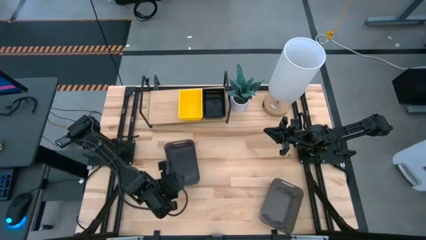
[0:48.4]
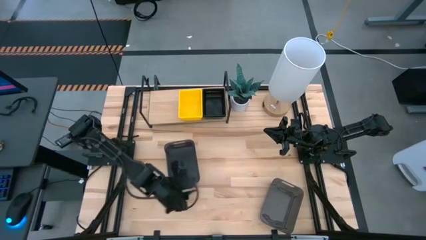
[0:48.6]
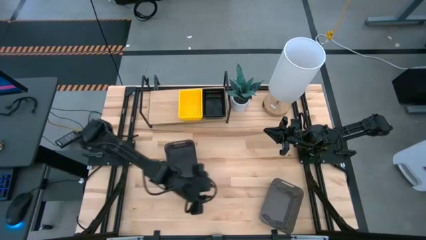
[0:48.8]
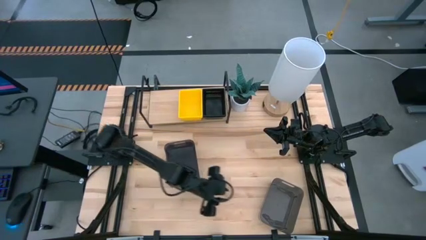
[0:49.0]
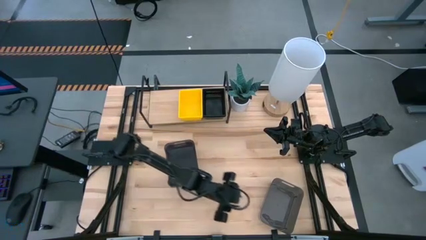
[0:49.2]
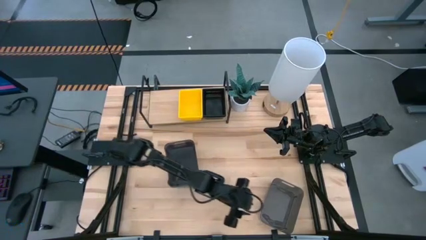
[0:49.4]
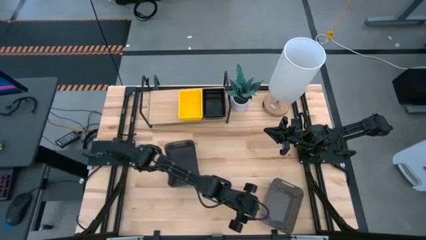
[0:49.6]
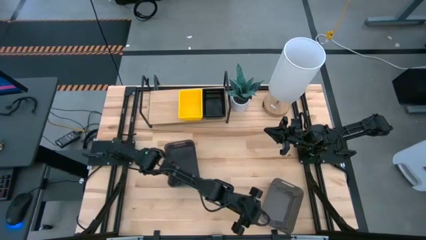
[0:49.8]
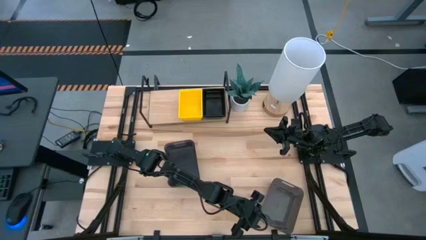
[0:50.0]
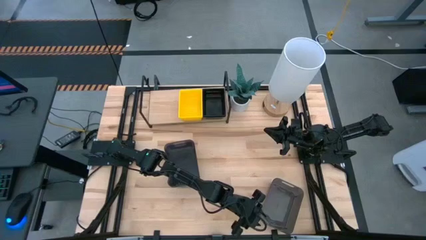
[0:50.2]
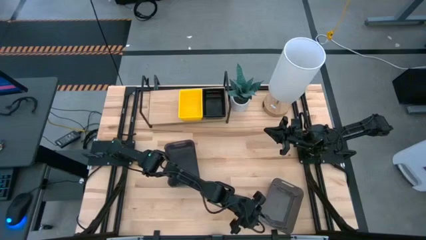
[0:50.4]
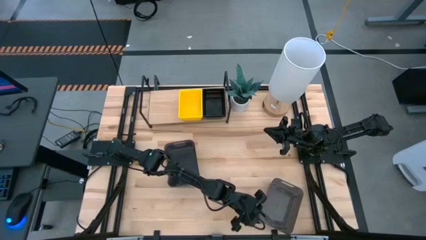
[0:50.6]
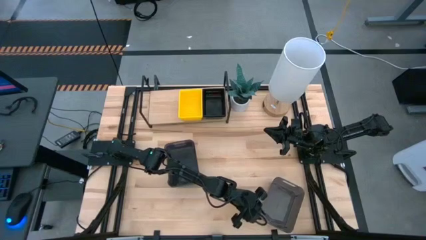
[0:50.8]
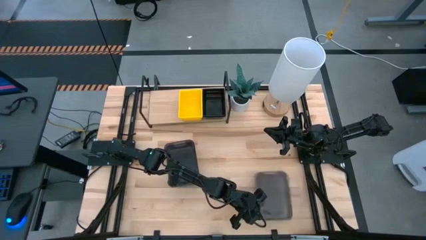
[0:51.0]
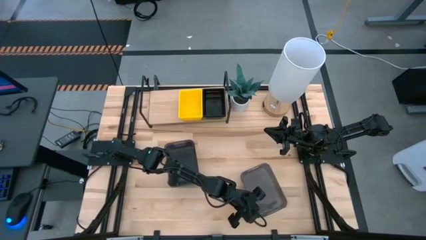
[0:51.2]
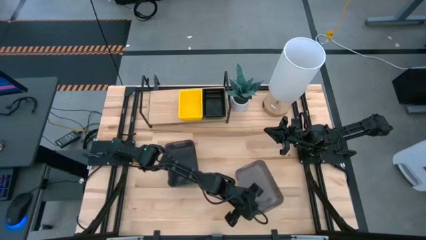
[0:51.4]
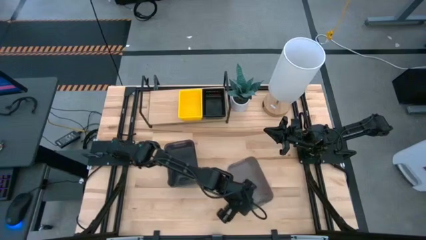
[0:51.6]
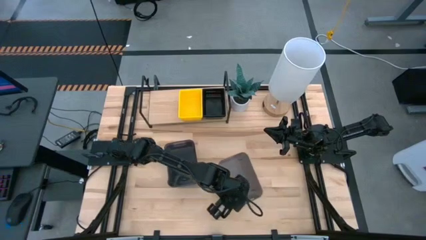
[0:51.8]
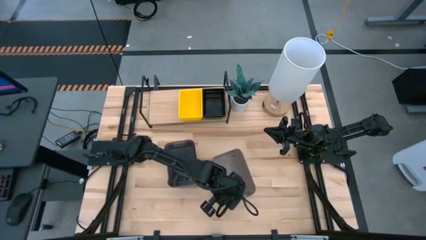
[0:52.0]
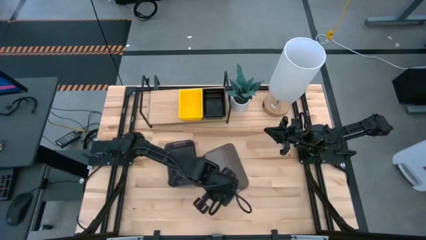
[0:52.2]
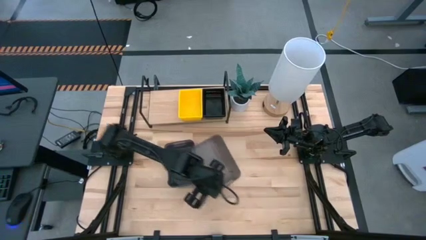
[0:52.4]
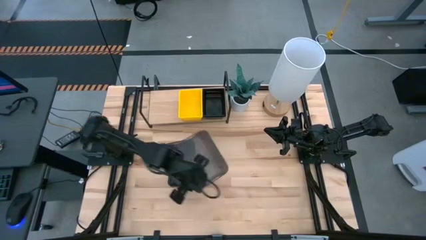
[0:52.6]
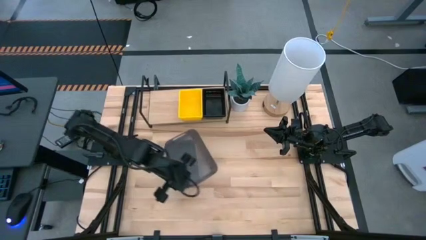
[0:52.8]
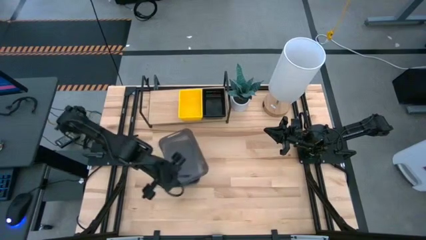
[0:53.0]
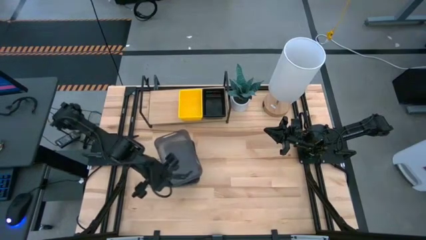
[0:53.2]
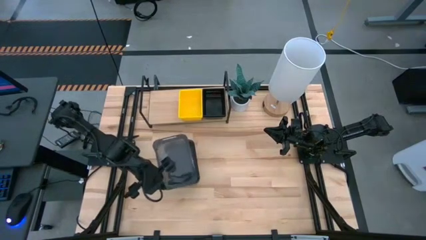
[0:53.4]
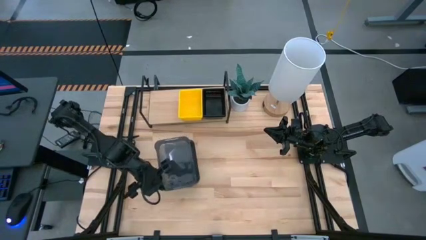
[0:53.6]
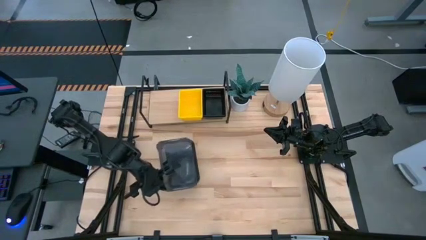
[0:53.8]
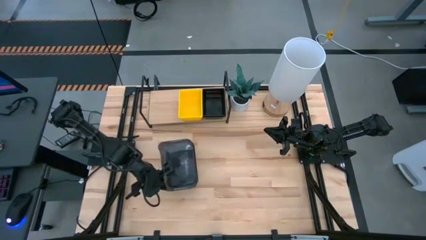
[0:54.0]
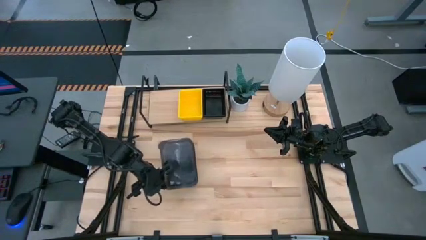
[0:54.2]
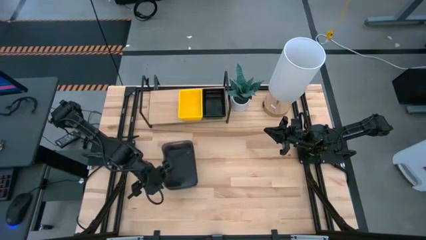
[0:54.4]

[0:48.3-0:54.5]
Task: Stack baskets on shelf by color
Stack the right transparent black bin on the transparent black bin

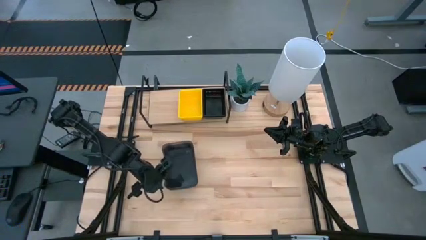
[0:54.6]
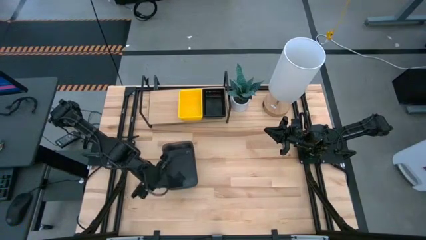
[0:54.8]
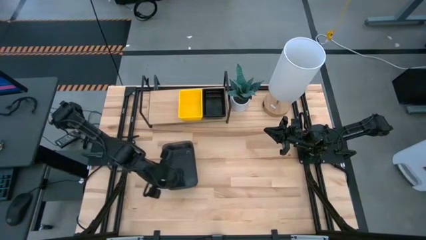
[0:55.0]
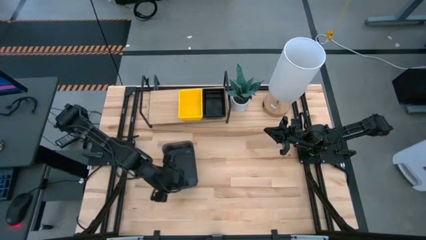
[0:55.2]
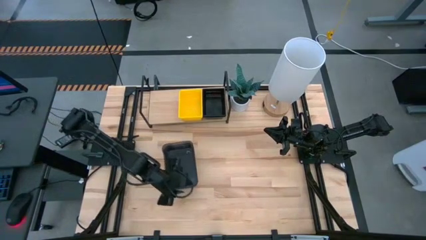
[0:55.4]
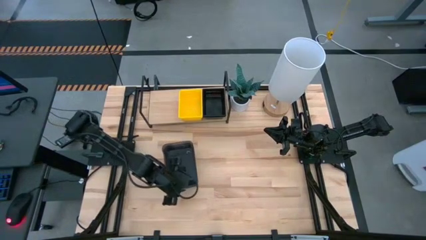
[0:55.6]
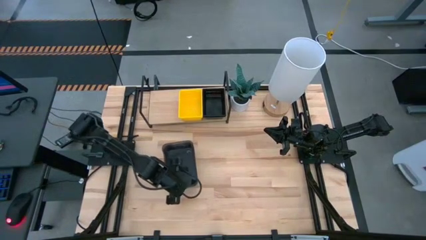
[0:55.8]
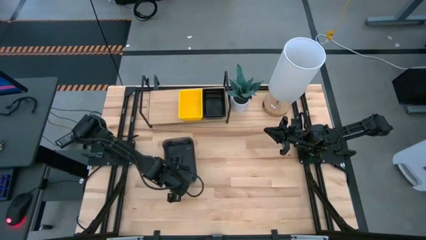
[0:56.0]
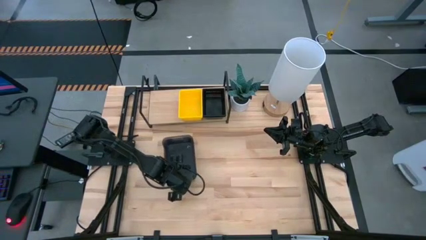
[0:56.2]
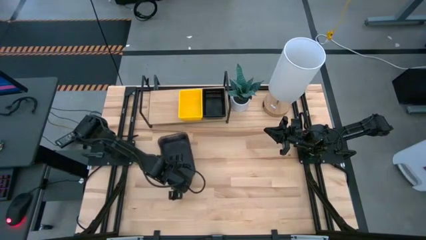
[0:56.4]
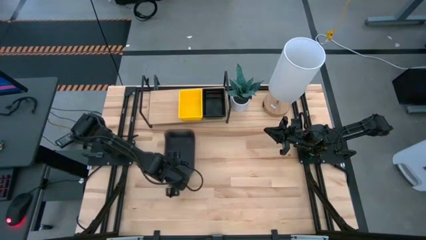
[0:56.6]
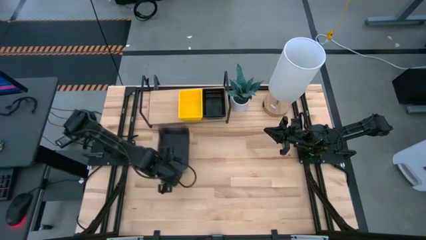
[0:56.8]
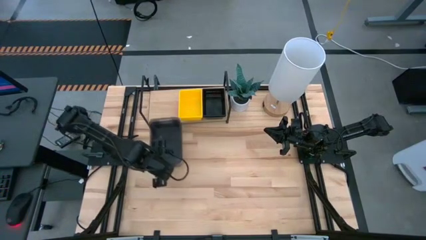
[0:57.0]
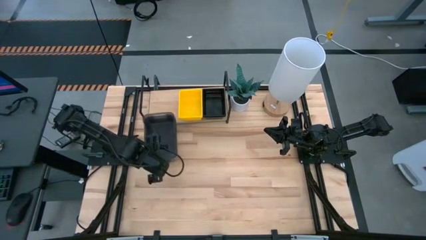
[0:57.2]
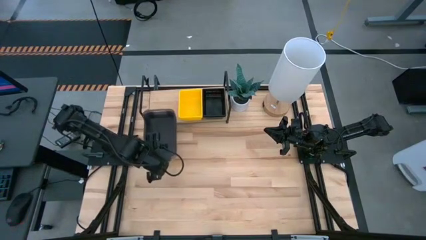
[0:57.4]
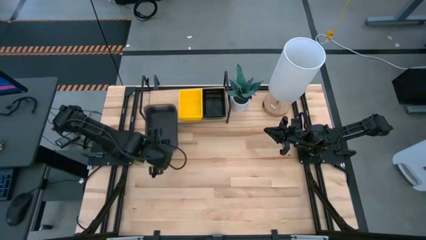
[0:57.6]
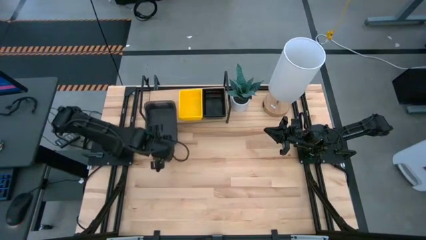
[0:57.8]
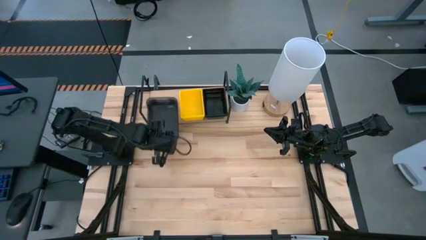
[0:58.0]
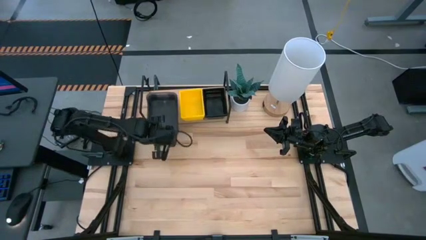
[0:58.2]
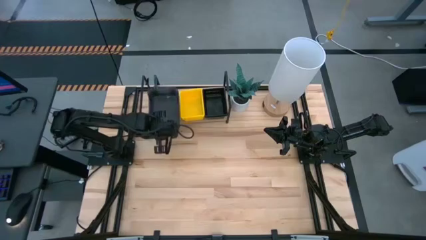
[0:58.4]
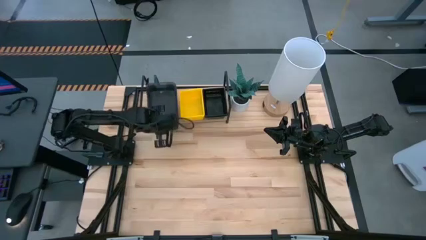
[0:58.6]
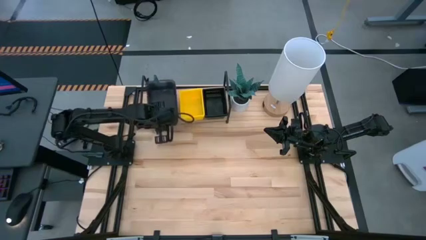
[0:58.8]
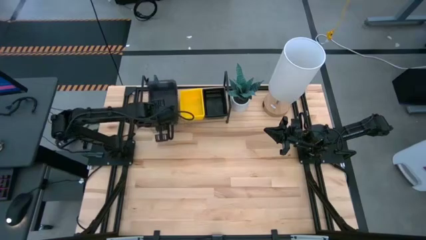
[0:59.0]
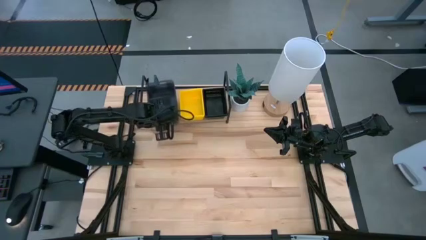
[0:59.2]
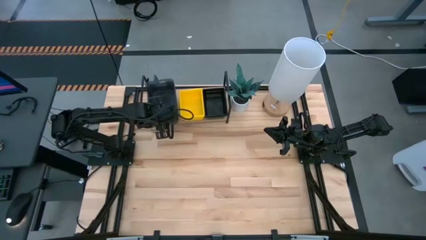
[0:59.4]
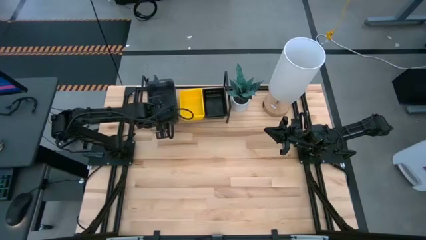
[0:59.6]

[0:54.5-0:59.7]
Put the stacked transparent black bins on the shelf

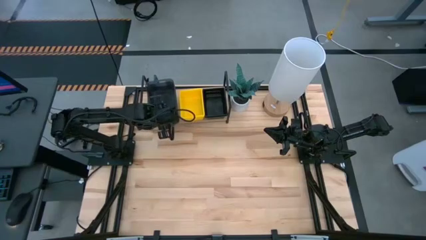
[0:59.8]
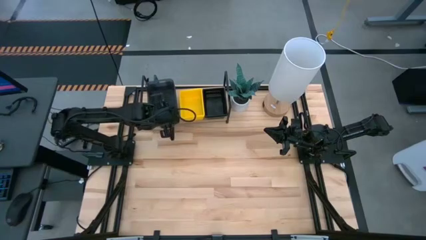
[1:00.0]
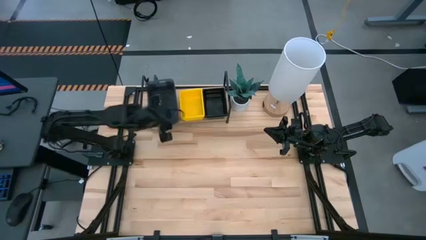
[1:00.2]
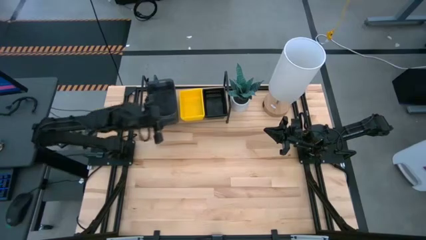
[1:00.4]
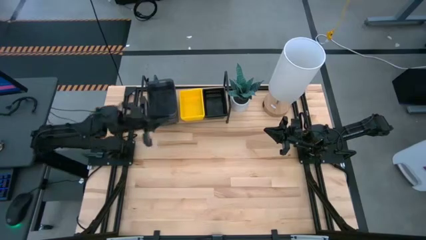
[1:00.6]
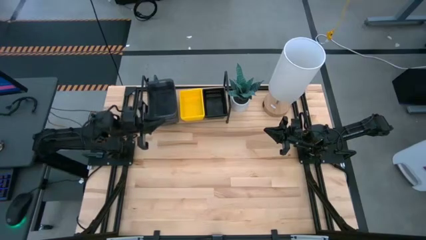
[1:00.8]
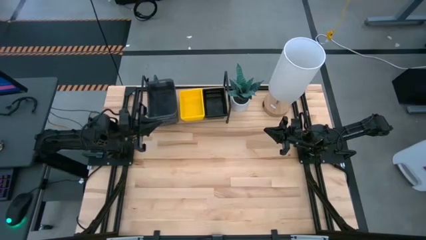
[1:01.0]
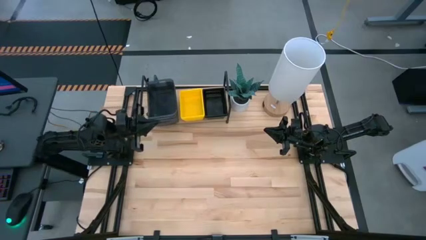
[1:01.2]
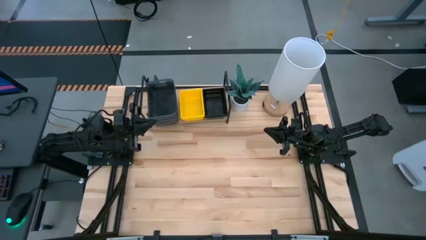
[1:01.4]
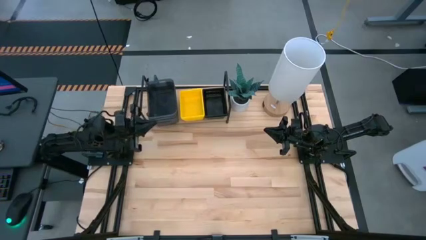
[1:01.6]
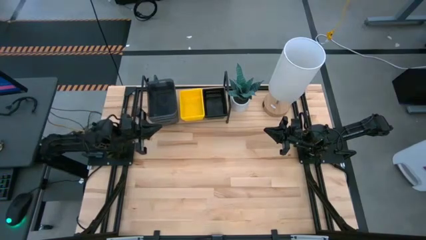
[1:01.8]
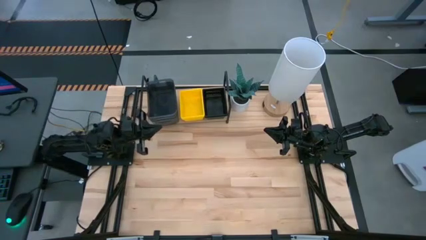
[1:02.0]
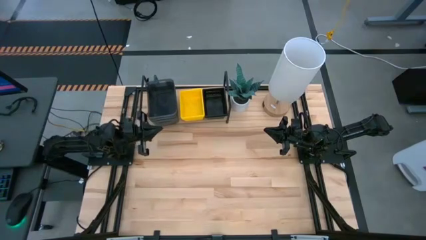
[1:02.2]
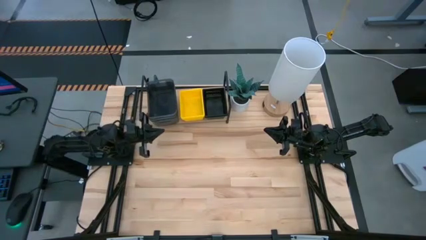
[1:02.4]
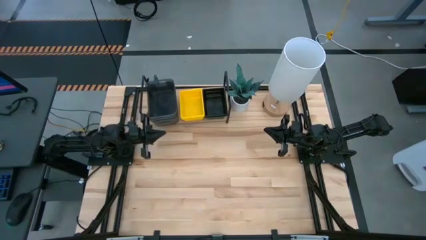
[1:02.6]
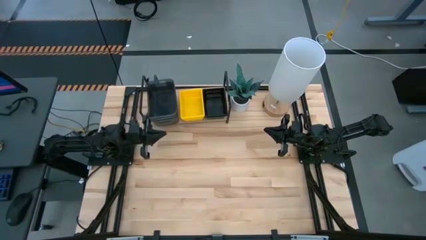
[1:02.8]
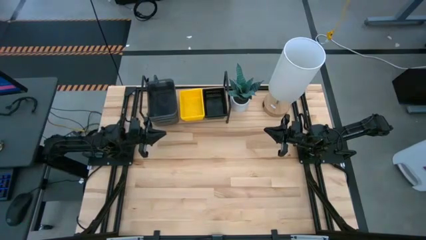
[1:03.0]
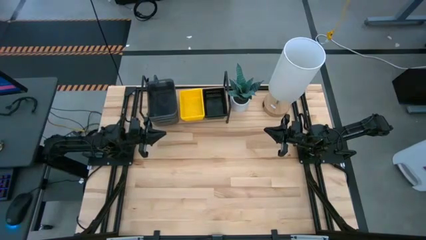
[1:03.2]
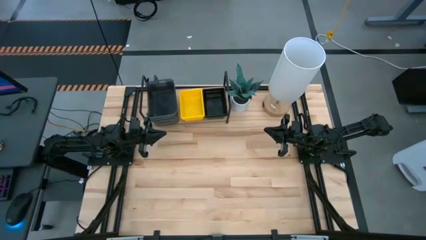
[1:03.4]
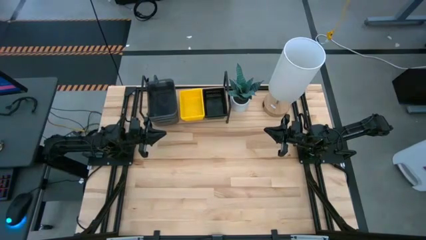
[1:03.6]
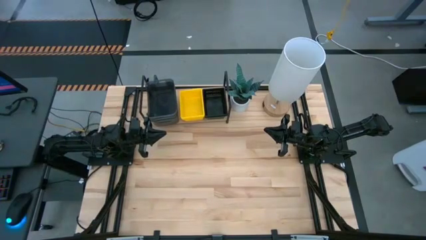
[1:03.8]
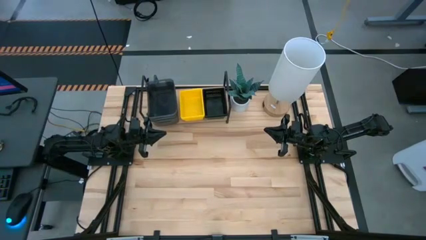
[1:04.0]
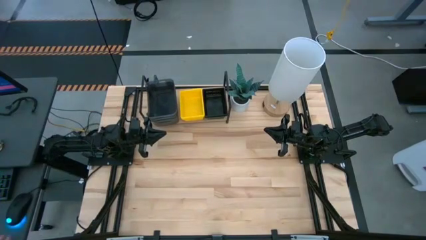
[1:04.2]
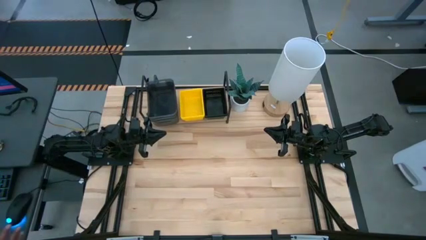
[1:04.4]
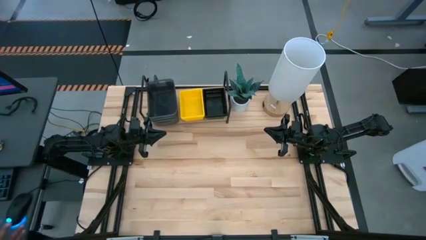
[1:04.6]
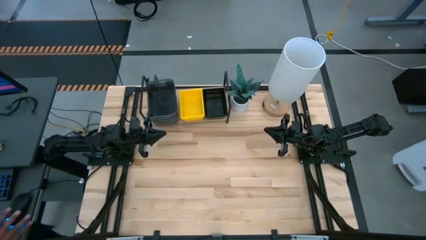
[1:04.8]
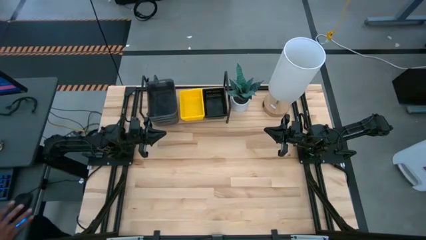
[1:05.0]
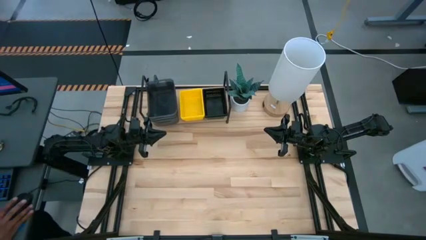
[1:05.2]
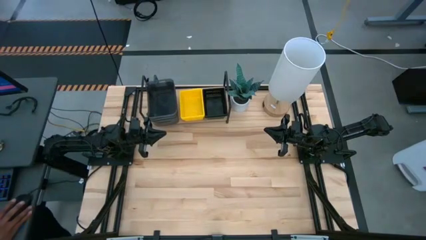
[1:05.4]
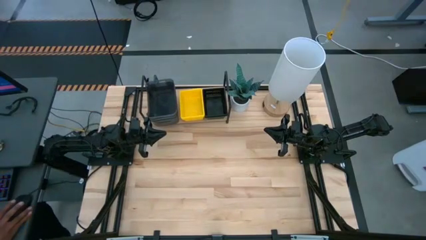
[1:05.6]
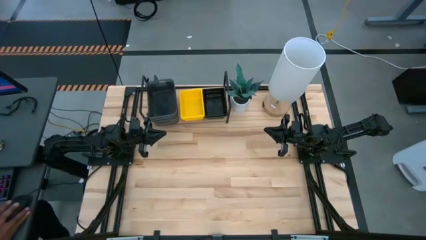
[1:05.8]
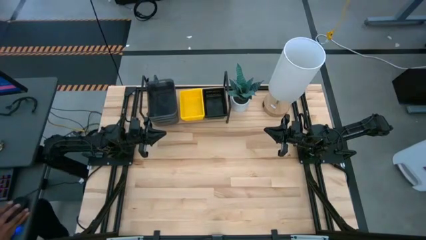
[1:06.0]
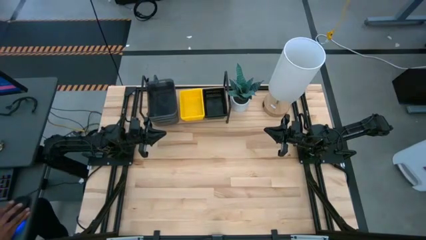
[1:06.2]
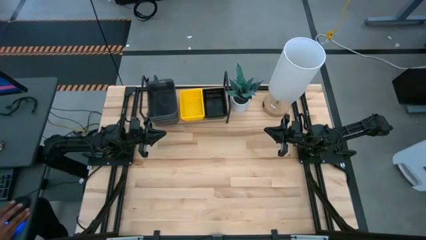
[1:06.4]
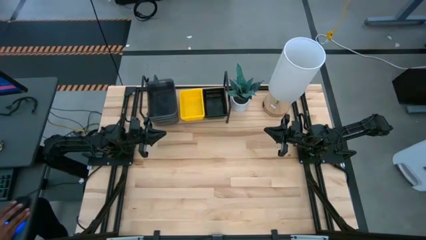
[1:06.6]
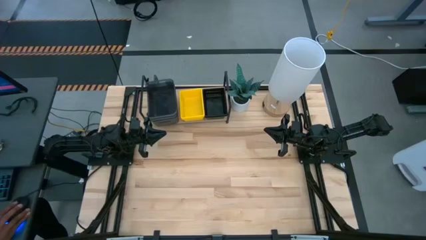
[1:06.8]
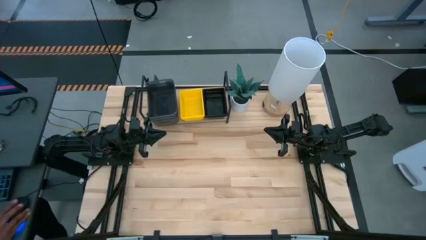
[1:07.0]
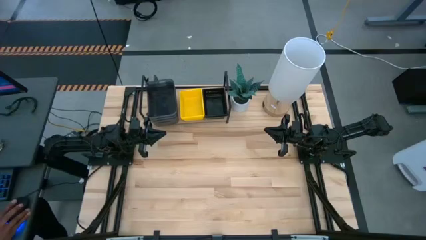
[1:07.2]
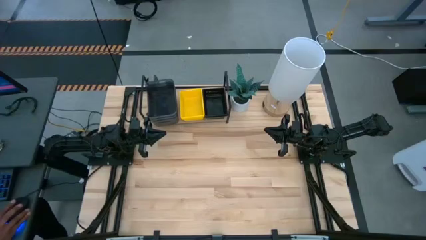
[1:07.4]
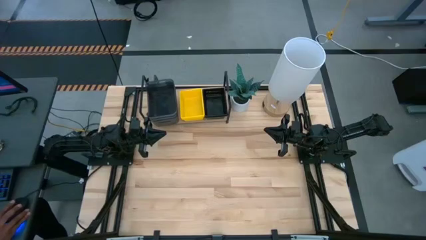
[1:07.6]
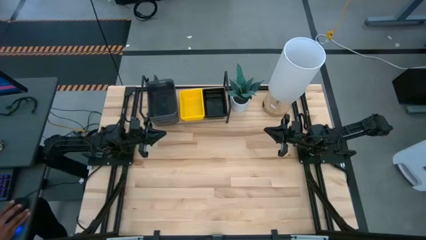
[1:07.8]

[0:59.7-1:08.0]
Return to Home Position
